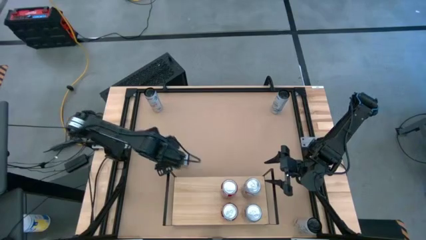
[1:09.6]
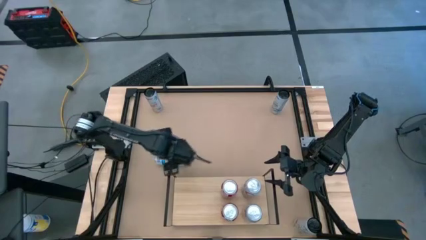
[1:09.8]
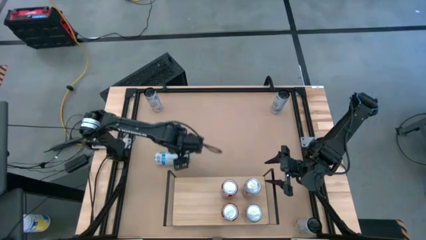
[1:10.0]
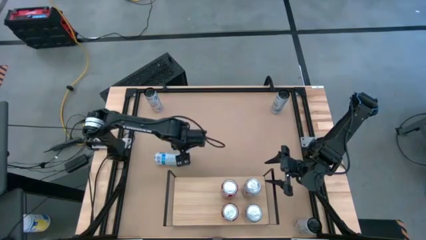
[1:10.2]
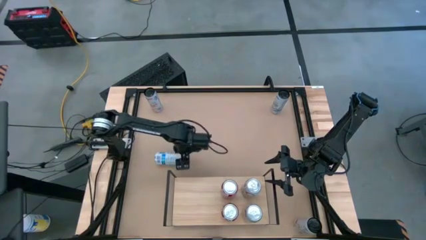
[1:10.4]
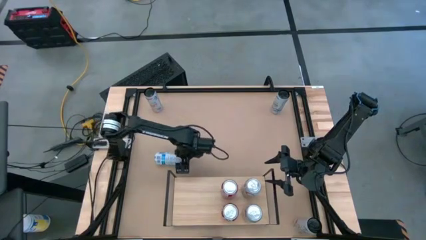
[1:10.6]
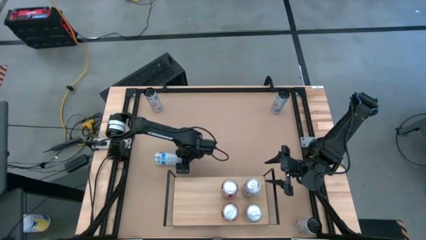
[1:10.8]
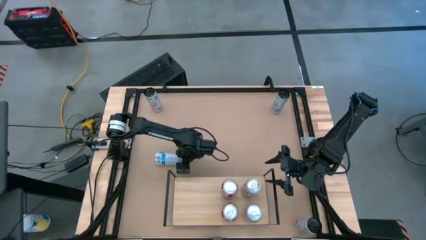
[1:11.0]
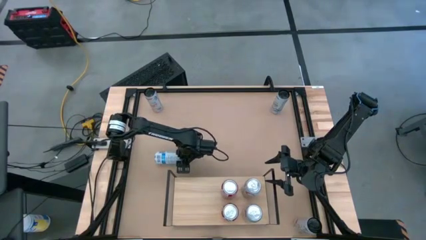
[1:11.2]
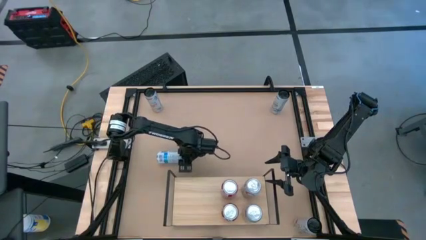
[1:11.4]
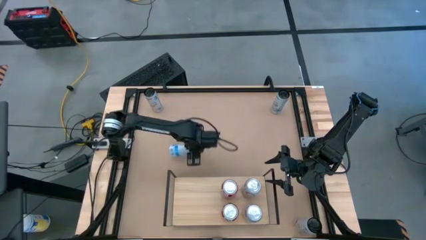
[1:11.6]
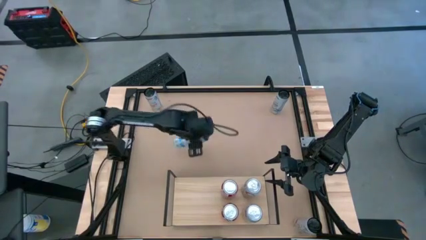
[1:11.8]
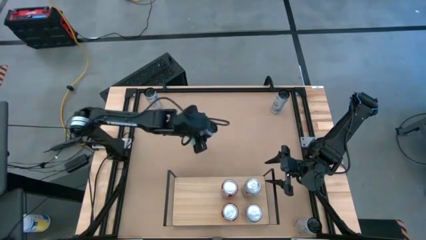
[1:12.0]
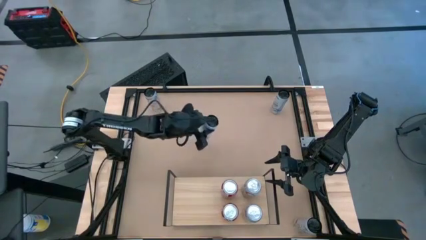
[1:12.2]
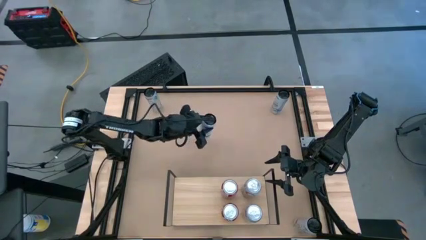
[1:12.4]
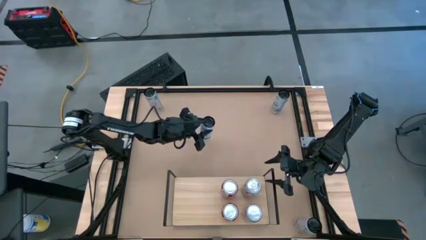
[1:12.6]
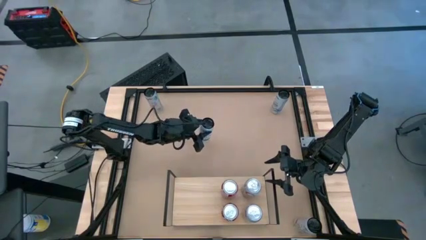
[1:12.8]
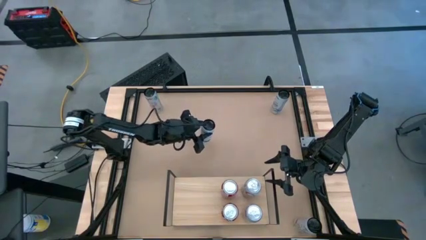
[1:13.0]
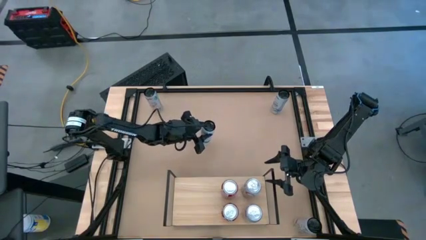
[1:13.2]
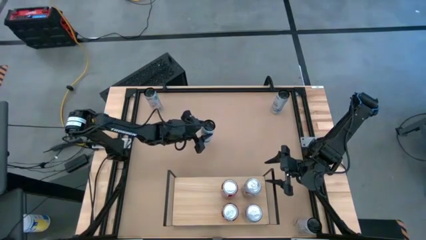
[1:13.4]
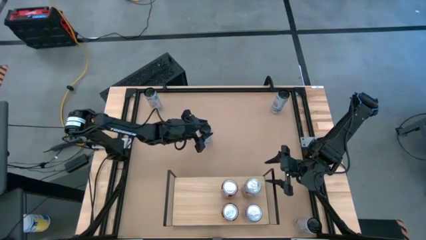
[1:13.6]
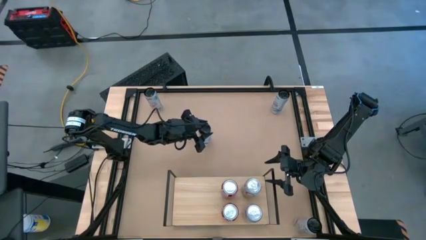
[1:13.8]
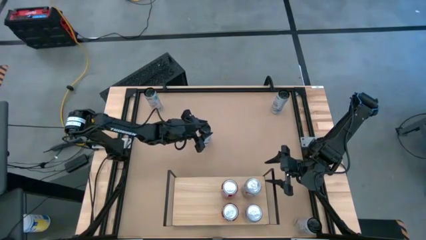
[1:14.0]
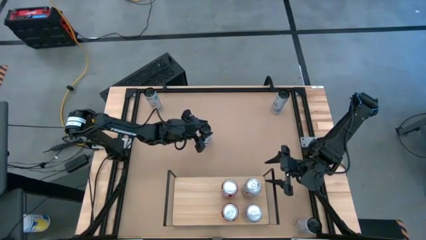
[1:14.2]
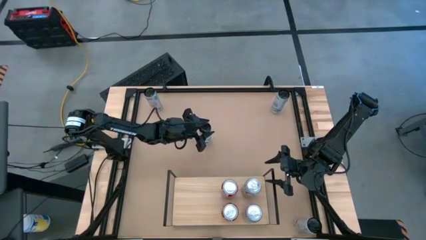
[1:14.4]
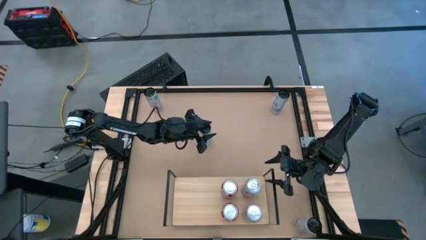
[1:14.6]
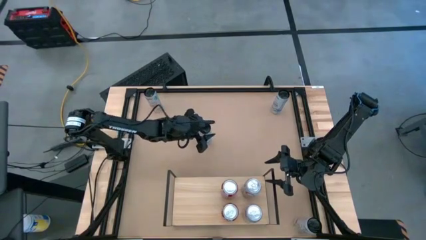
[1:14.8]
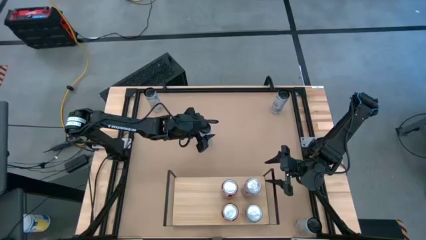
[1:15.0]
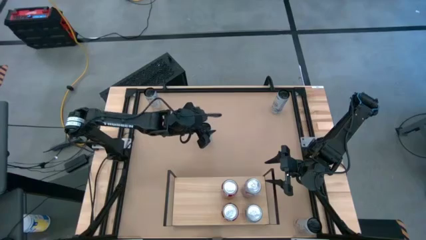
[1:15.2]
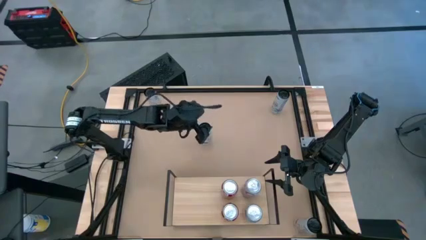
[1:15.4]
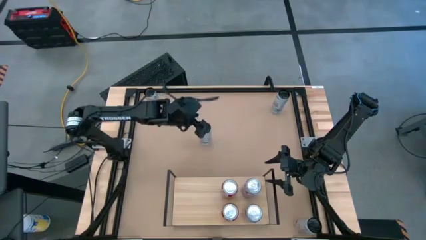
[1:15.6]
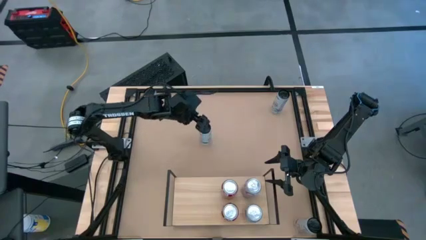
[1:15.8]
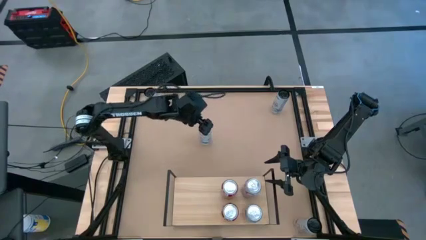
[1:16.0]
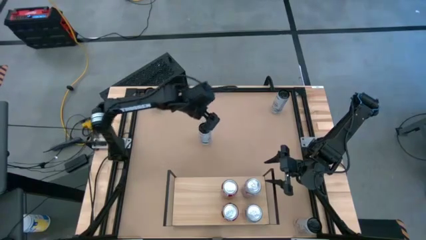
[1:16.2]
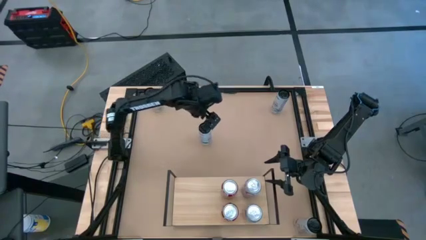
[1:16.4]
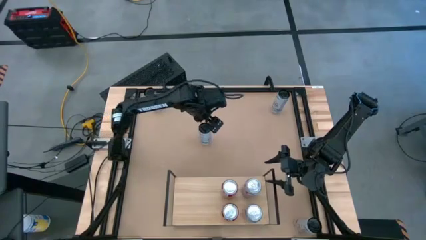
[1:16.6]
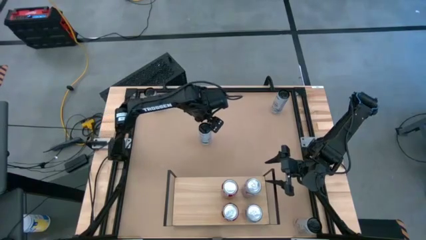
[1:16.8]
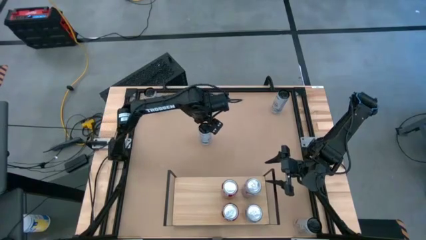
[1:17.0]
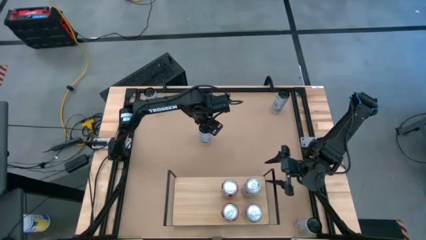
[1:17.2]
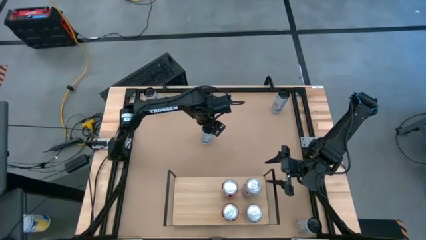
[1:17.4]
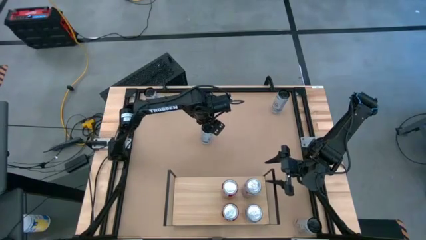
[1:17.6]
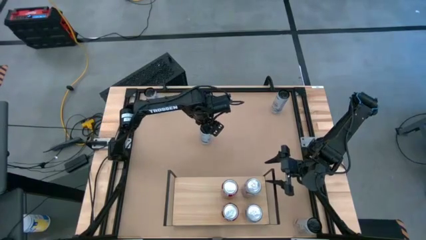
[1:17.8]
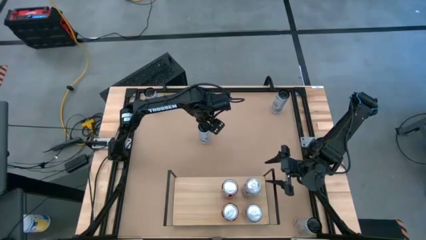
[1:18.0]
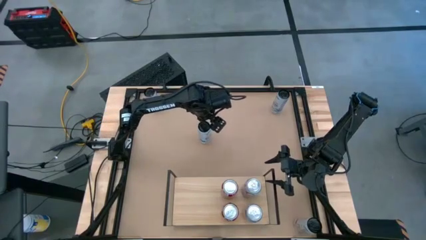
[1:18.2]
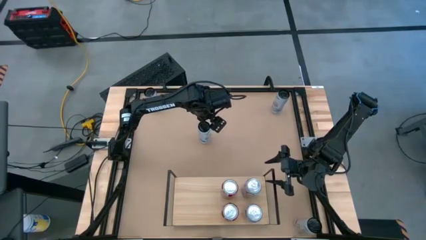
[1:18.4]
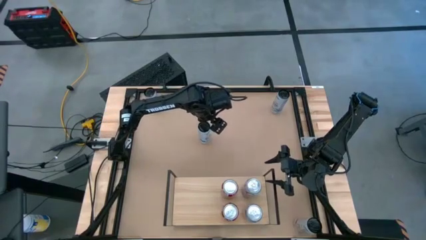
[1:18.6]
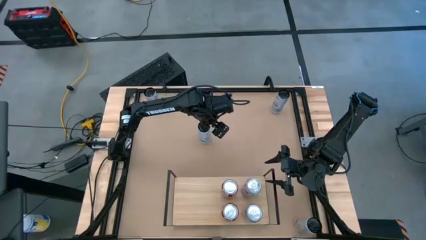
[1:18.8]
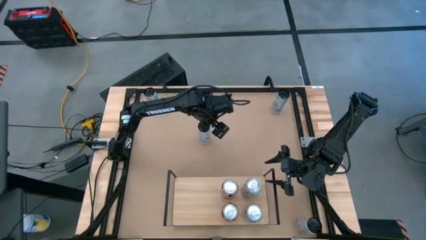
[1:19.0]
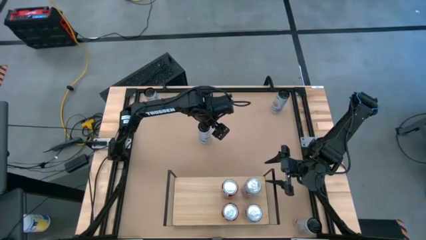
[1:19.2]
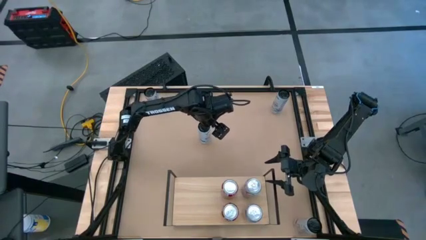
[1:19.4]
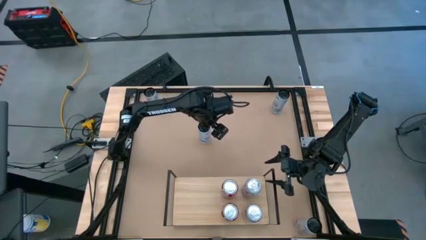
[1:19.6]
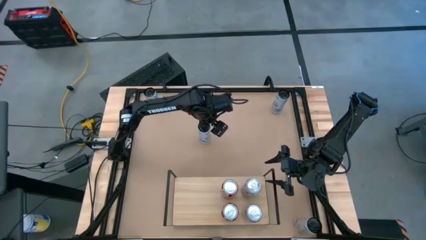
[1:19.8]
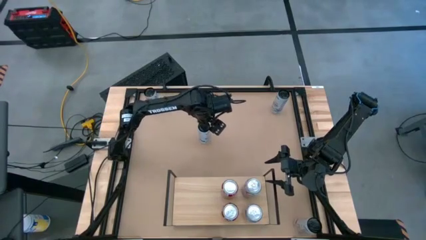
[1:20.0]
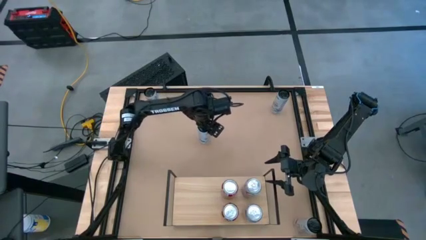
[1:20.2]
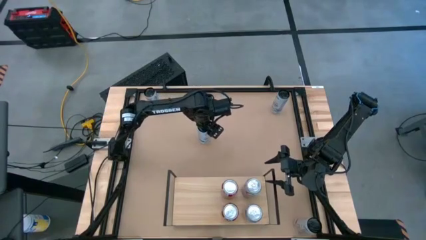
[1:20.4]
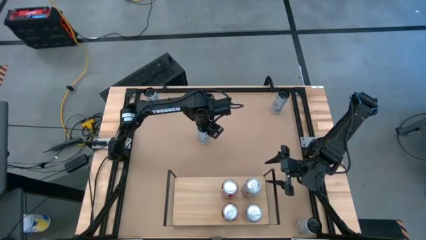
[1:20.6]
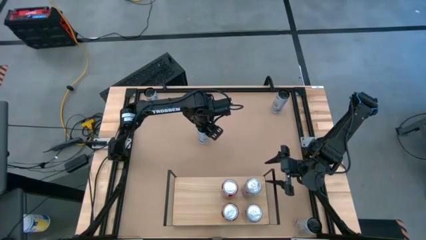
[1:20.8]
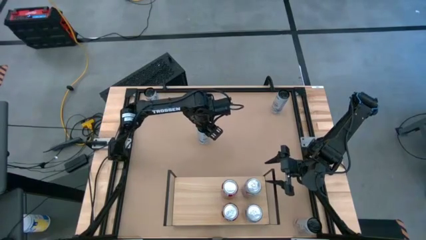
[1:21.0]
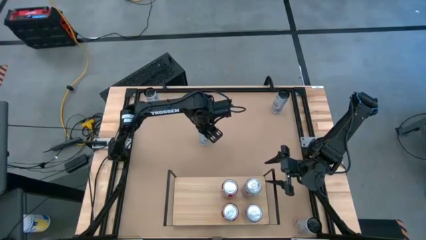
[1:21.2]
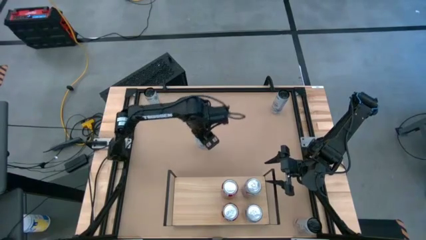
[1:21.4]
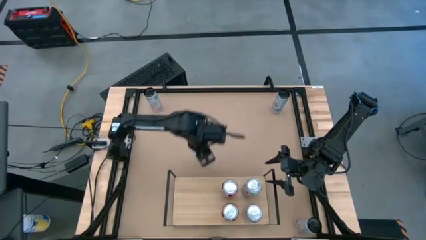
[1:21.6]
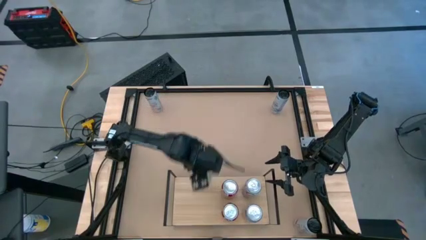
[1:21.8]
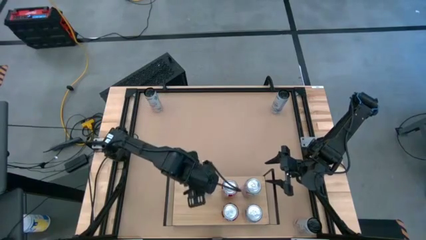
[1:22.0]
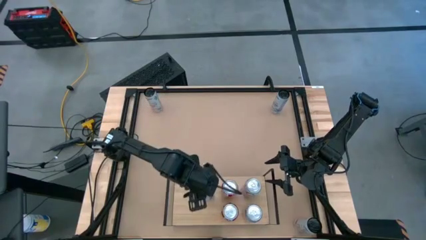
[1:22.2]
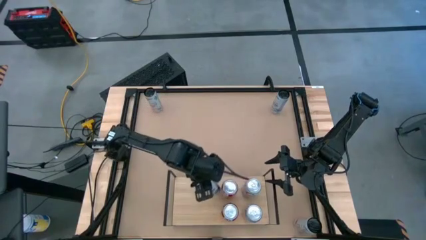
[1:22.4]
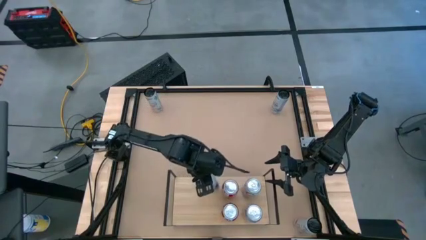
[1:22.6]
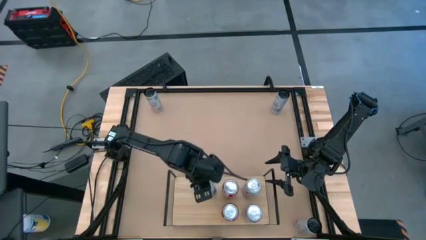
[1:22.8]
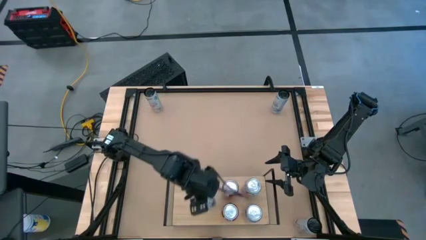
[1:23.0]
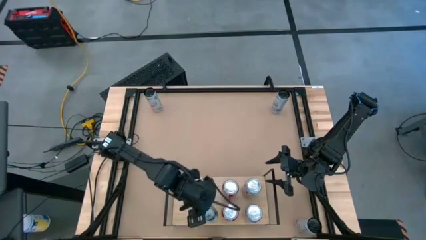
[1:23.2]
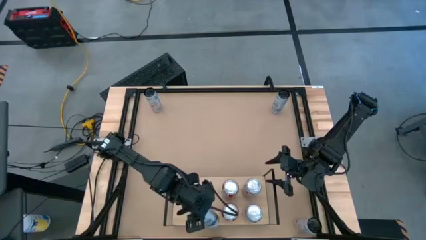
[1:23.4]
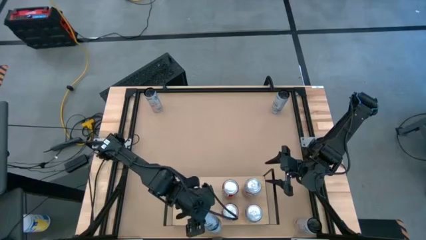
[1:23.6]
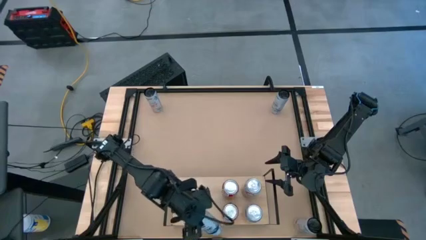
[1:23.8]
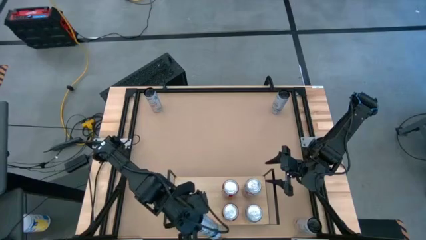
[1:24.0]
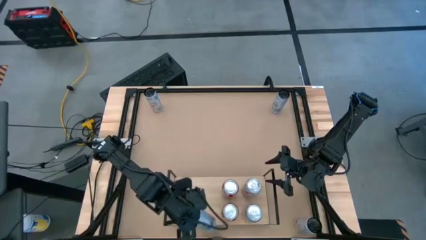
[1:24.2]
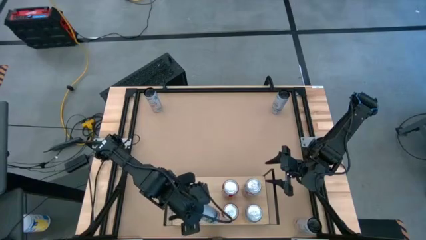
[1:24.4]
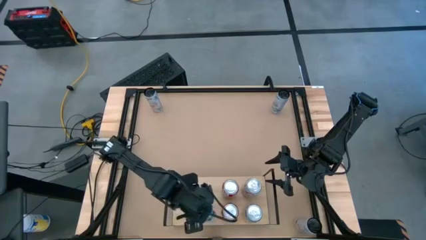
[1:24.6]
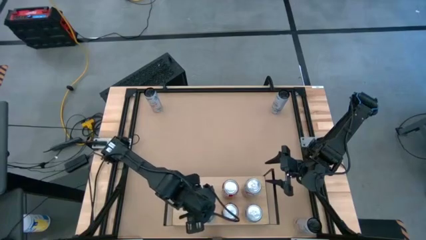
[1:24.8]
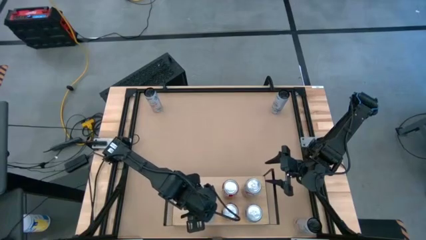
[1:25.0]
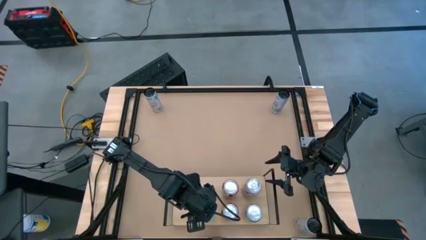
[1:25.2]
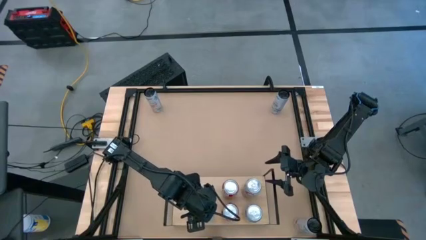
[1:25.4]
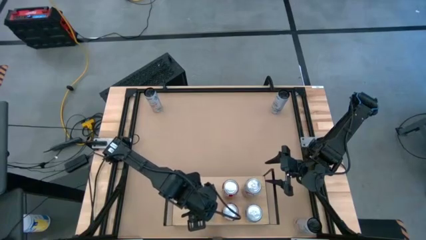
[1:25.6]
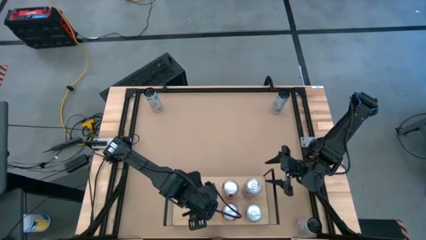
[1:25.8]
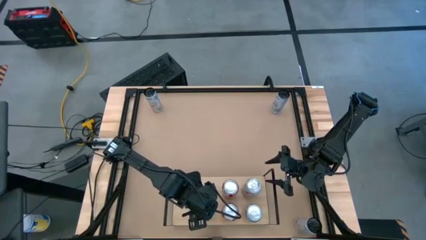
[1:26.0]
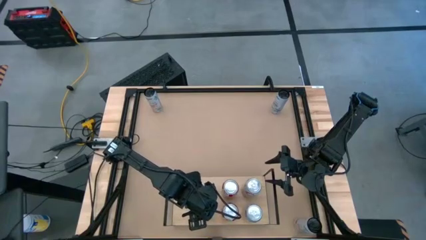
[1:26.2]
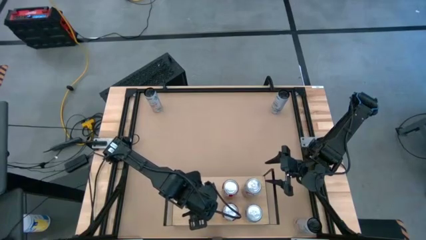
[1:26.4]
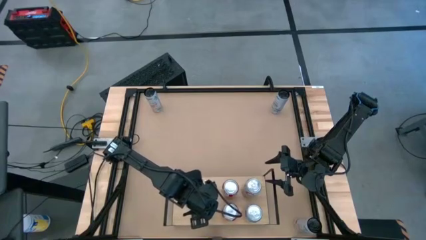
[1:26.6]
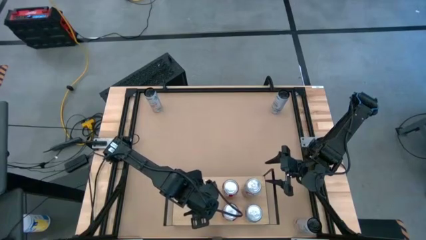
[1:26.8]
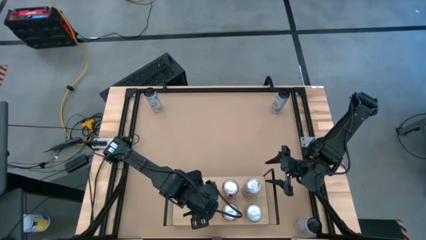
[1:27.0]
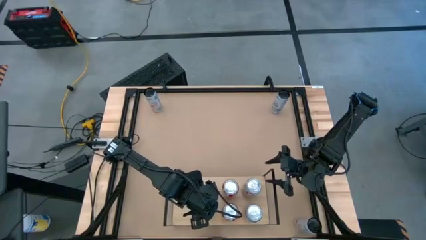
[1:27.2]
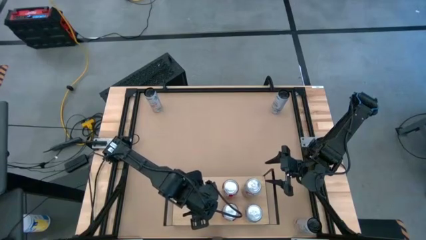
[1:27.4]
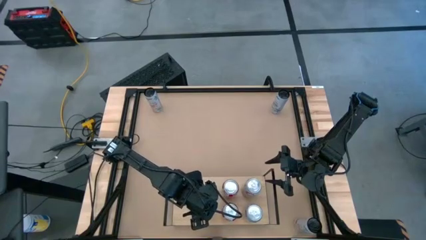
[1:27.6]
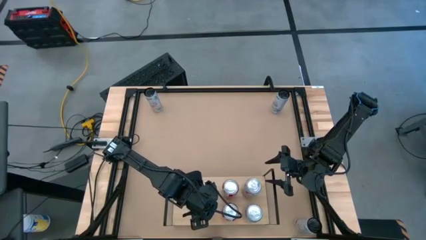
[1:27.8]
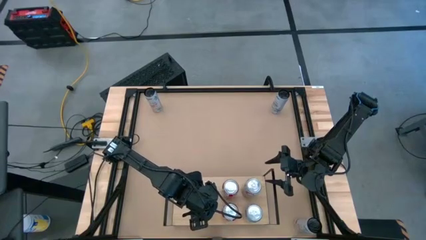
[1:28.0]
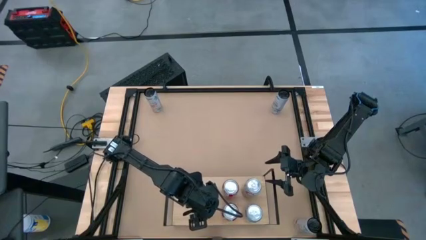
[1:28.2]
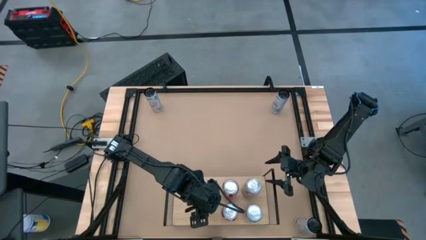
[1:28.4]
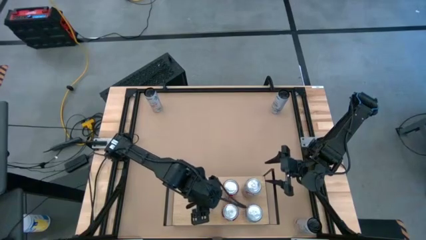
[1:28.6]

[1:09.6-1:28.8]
Task: Place canned beverage on shelf
Put the bottom white blue soda can on the shelf
